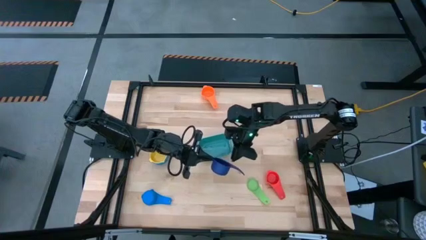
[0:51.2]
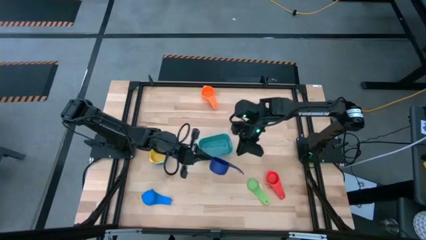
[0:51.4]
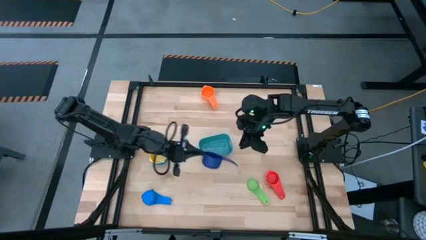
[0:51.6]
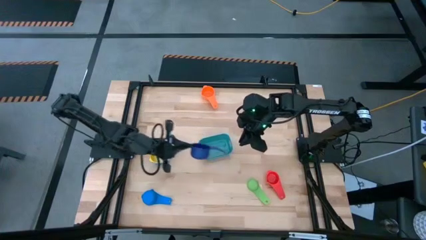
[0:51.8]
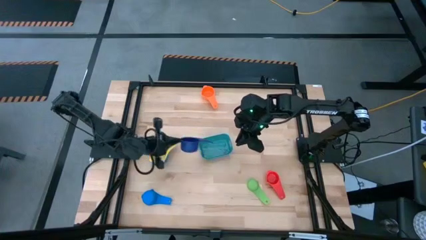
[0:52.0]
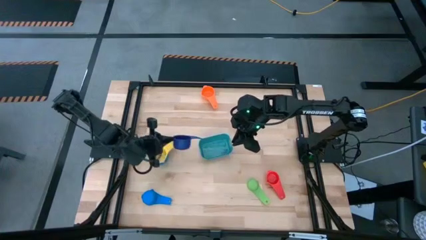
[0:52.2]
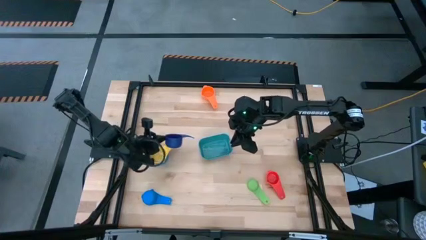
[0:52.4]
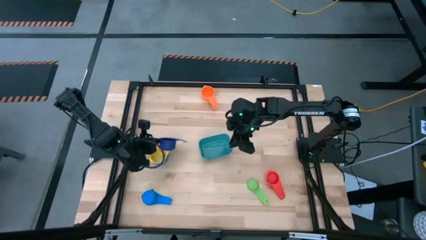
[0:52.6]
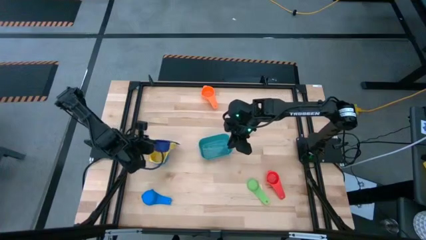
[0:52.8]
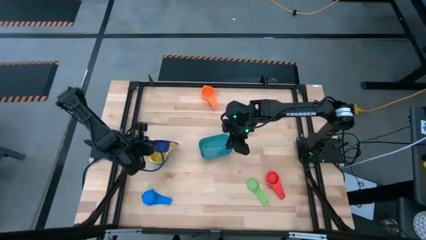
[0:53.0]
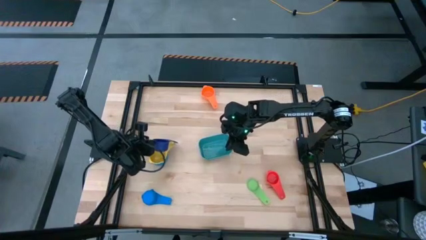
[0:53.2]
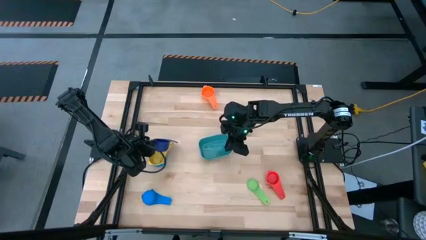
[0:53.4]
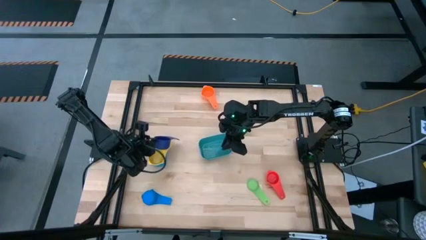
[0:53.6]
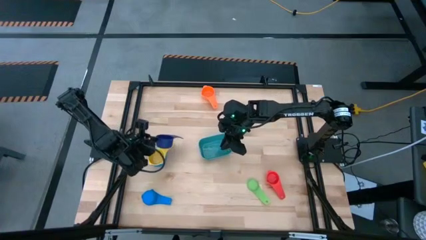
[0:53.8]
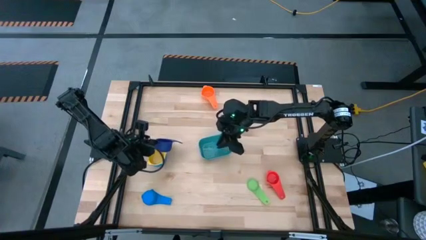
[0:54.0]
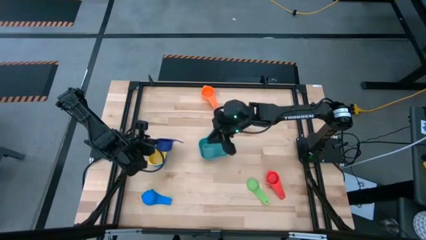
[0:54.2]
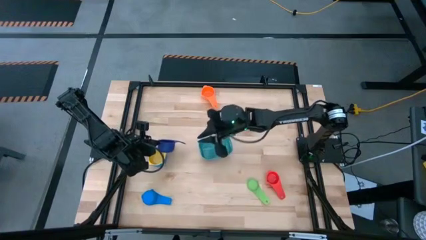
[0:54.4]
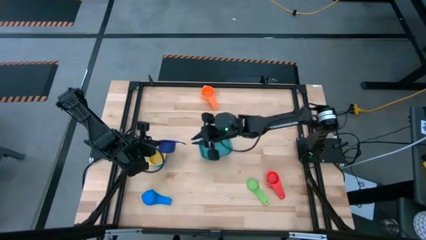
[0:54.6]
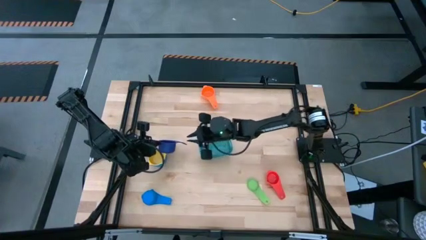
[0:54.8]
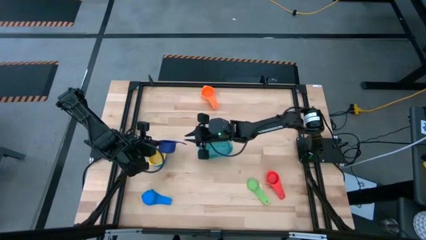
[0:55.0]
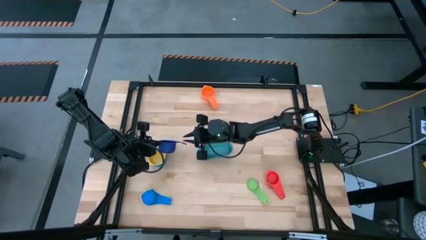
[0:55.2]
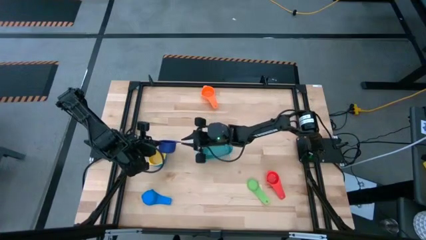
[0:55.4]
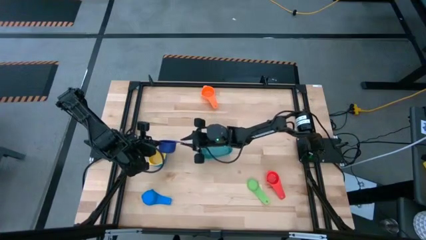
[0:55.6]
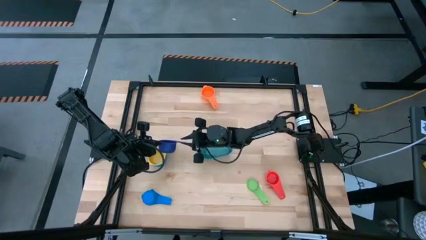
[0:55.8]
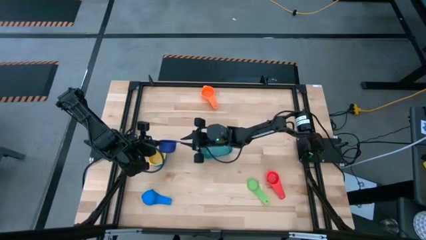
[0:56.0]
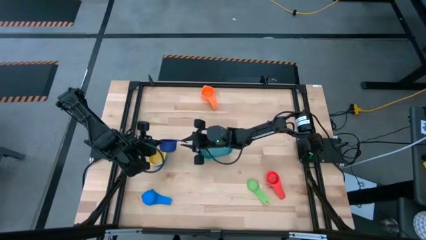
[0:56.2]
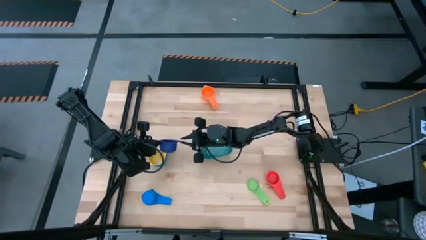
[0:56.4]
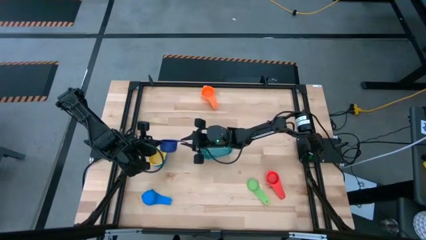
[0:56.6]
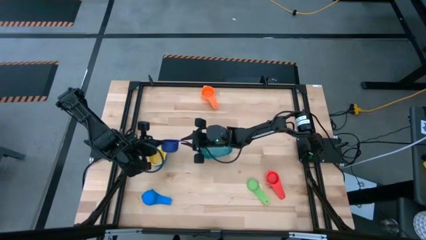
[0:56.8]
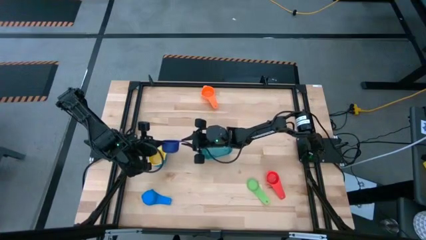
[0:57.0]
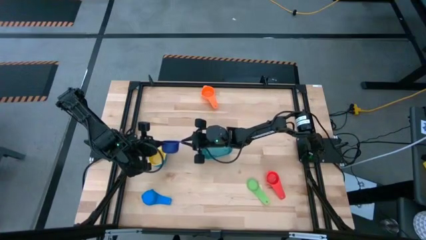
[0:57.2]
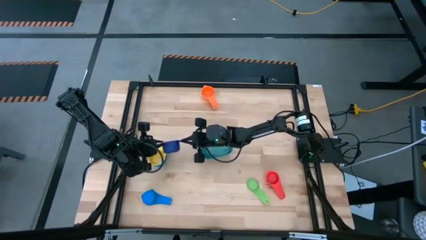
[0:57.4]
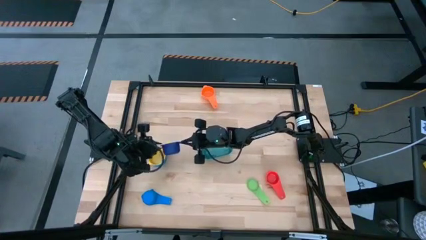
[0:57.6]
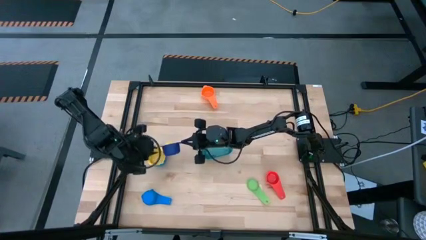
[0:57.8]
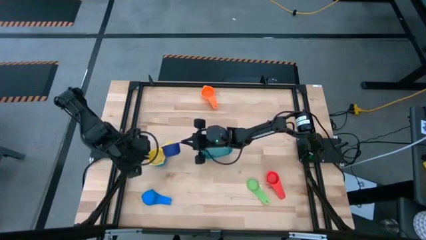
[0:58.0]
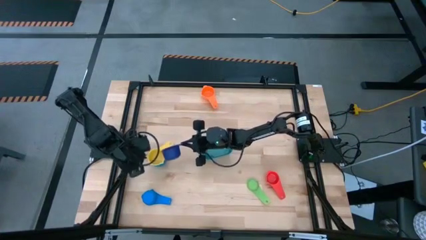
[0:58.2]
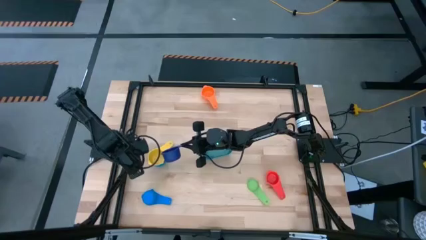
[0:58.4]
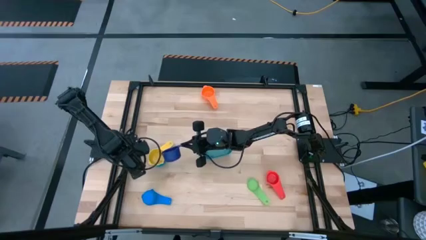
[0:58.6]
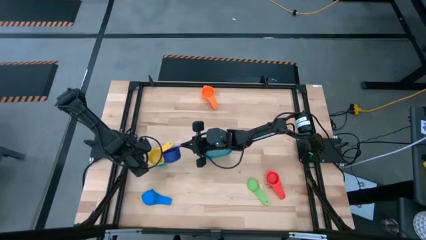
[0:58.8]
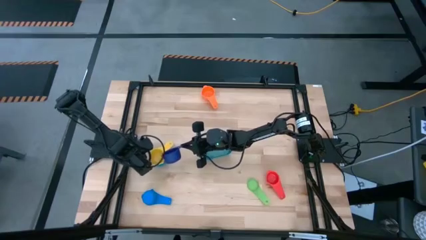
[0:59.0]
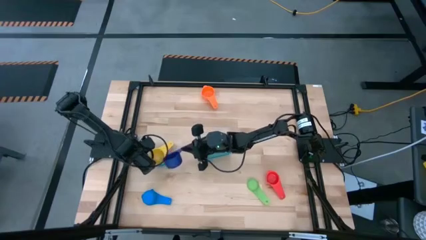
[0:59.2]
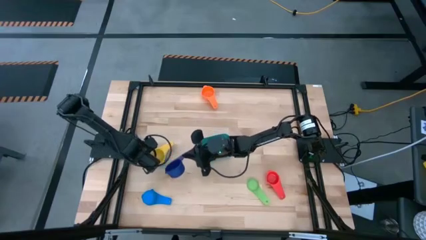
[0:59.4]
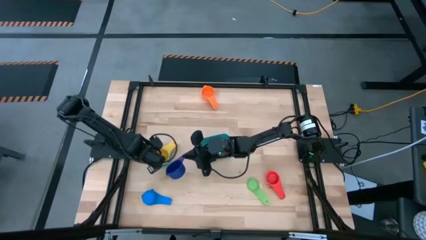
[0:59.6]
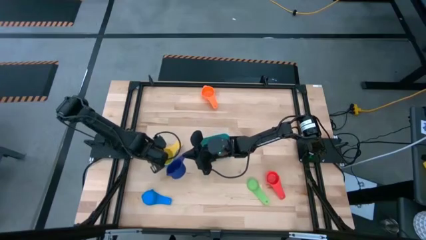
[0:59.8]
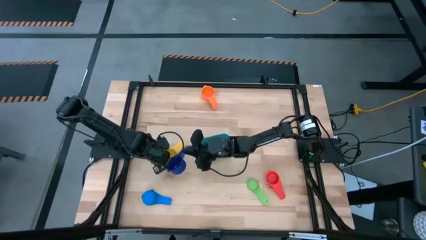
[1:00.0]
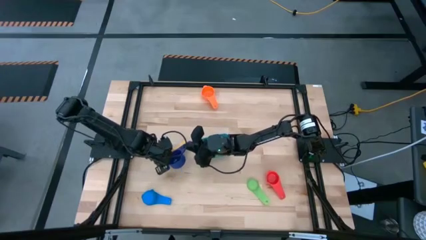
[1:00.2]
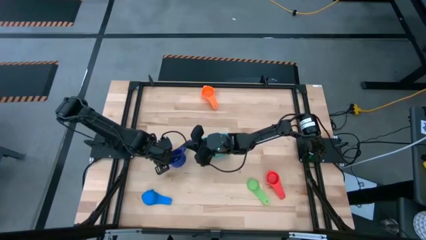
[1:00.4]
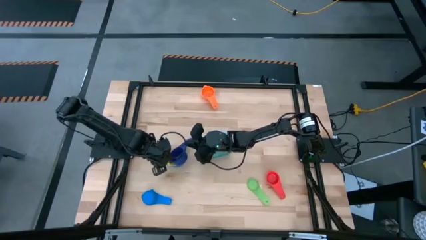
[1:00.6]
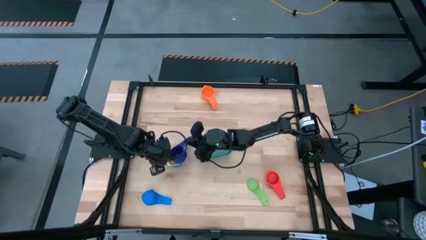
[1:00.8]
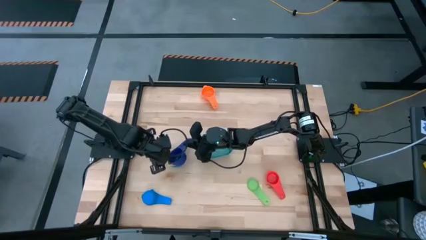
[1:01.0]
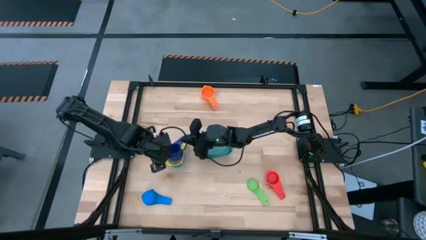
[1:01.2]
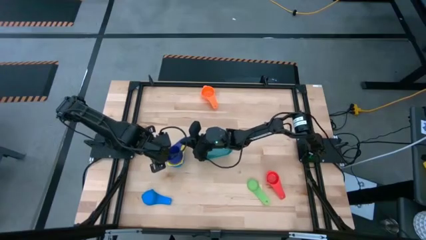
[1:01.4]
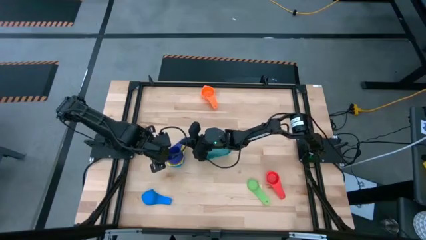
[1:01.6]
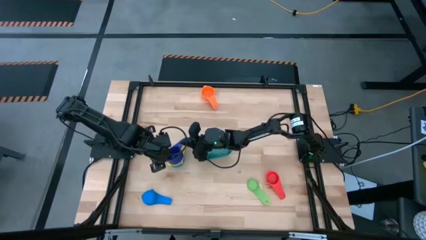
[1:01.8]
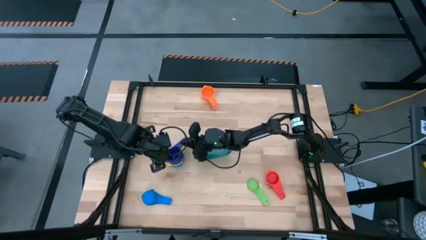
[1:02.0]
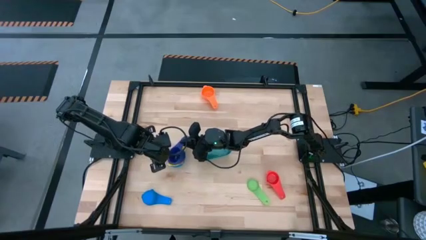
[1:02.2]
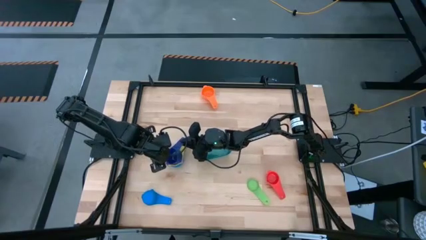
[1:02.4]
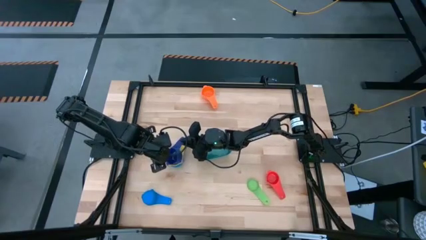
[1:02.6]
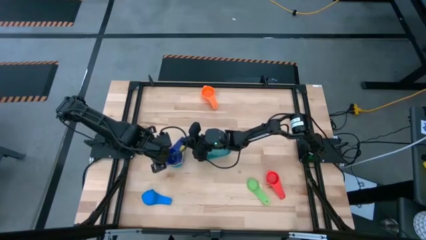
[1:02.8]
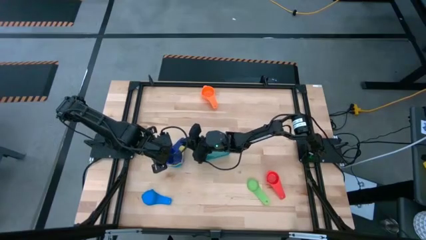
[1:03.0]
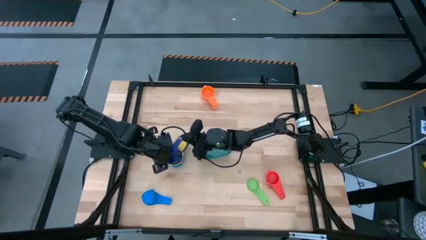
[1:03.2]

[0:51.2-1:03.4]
Task: Nest measuring cups in basket
Stack the dark blue measuring cup on top of the yellow measuring cup

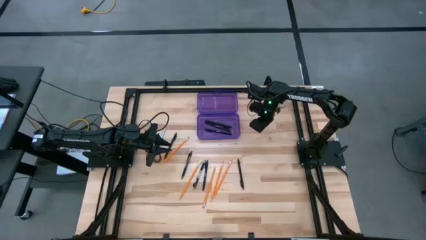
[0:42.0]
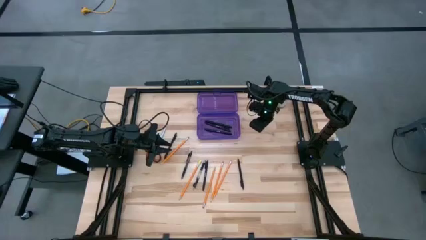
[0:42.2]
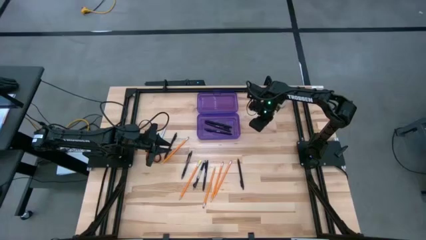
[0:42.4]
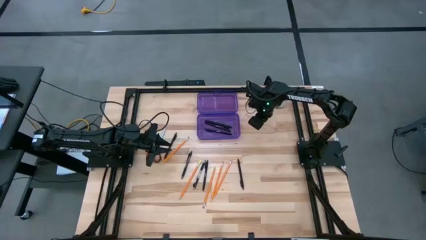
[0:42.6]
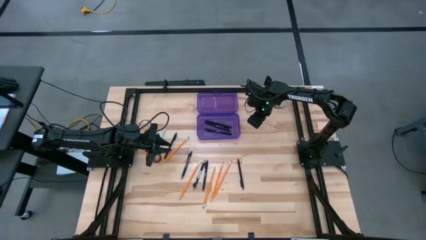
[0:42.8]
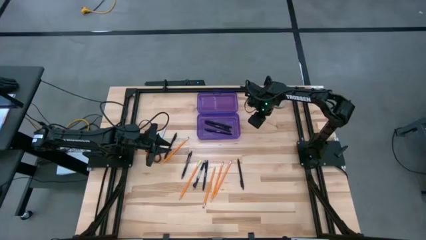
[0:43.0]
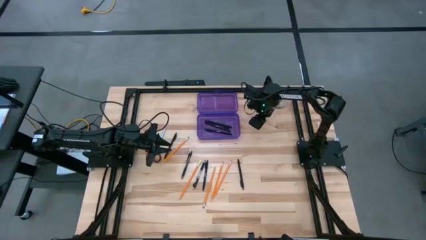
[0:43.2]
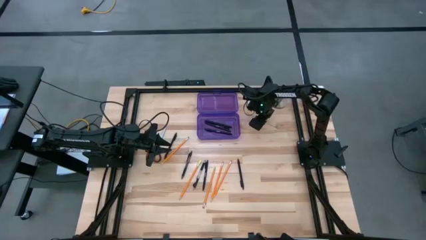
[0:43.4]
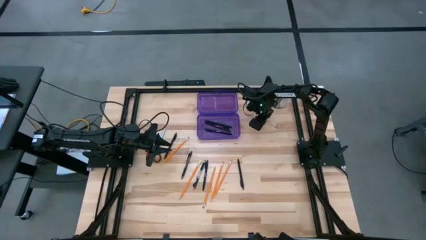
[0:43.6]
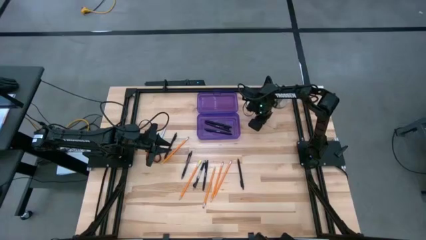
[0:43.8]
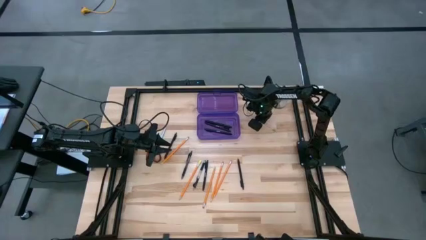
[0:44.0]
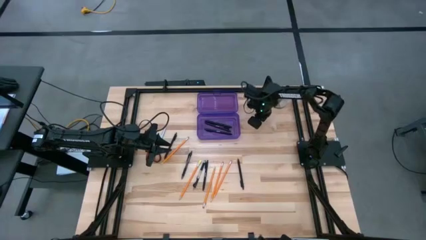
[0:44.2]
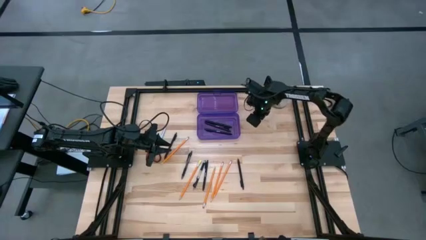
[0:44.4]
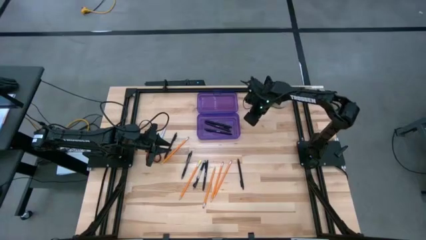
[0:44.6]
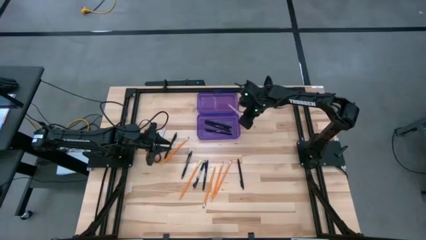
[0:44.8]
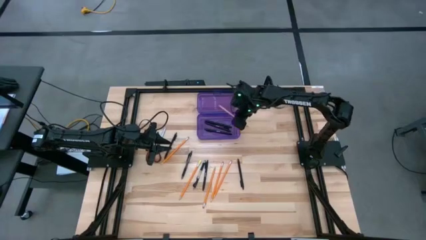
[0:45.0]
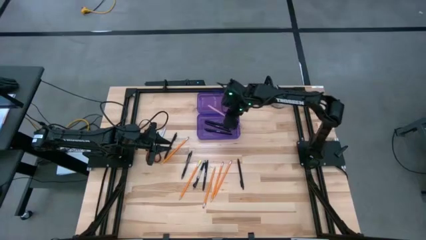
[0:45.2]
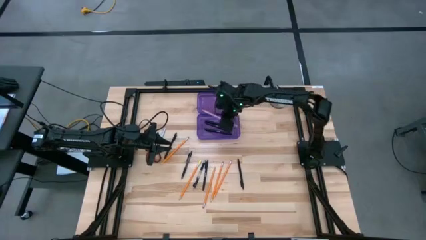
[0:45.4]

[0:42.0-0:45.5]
Task: Pick & place school supplies into a supply box
Put the light pink pencil into the purple supply box
